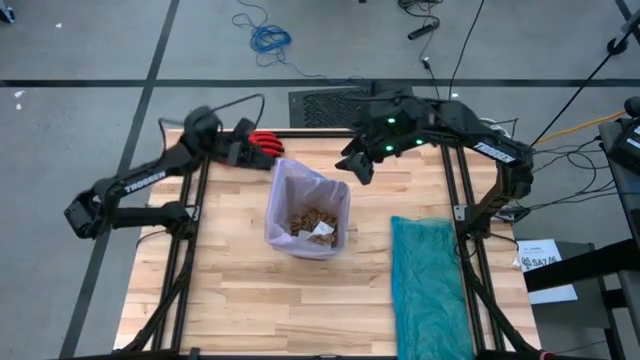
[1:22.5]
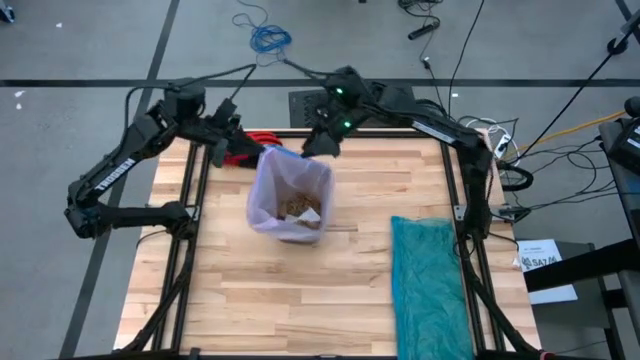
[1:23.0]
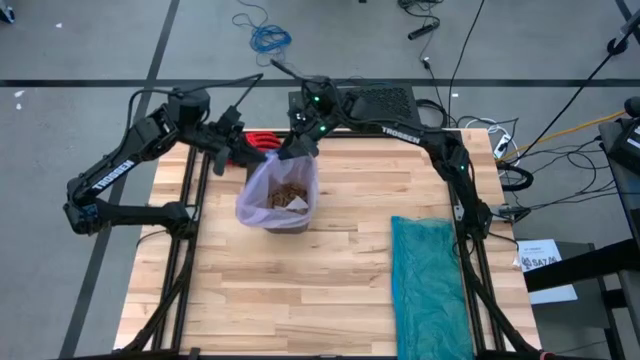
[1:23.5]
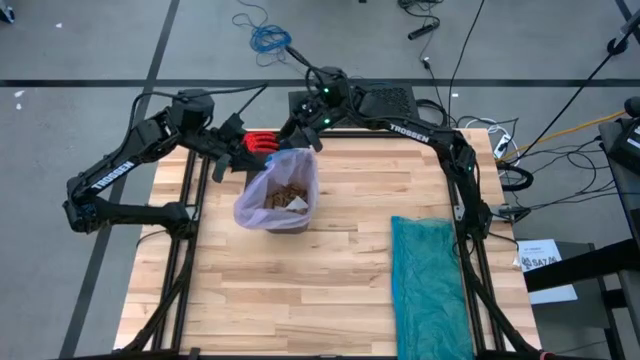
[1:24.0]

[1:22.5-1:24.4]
Task: place trash/remove bag and relplace
Close the pink trash bag inside the trash bin

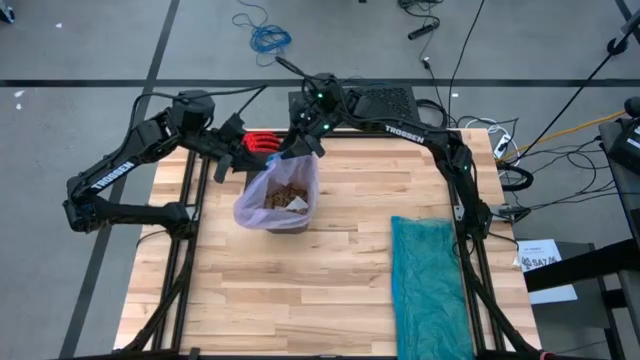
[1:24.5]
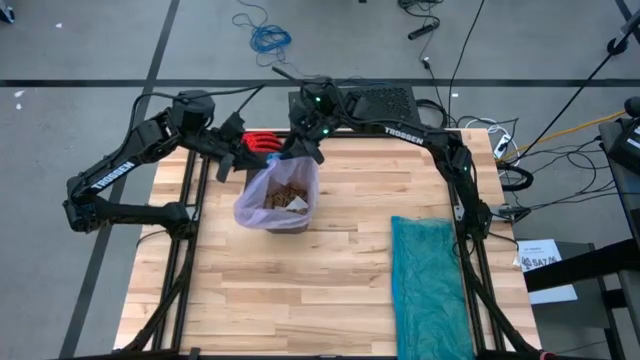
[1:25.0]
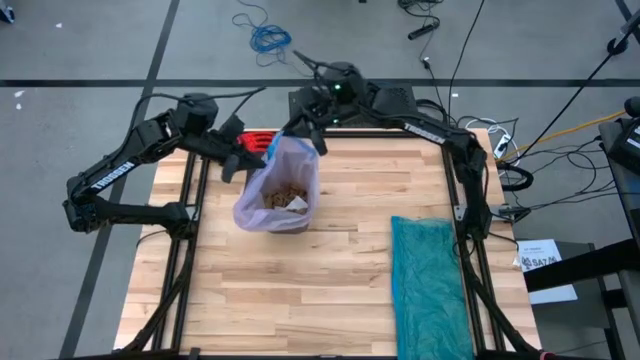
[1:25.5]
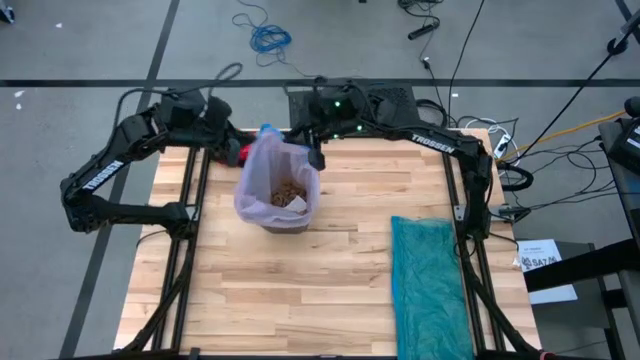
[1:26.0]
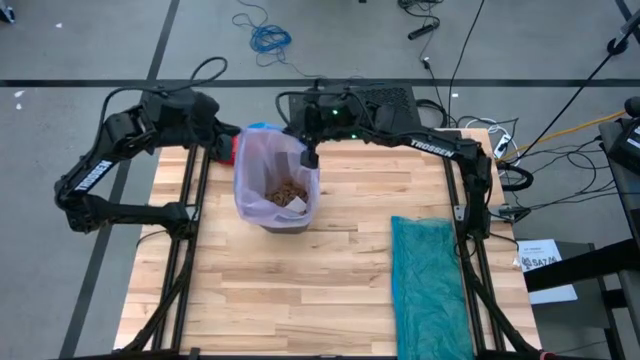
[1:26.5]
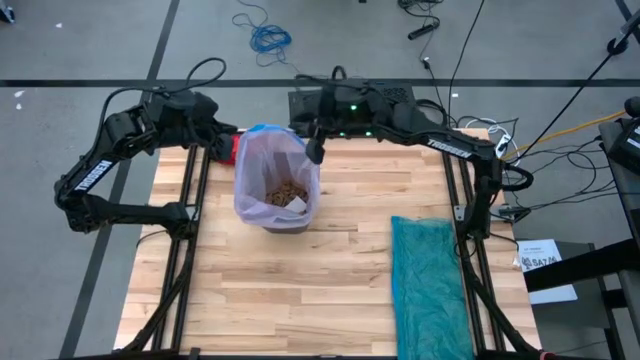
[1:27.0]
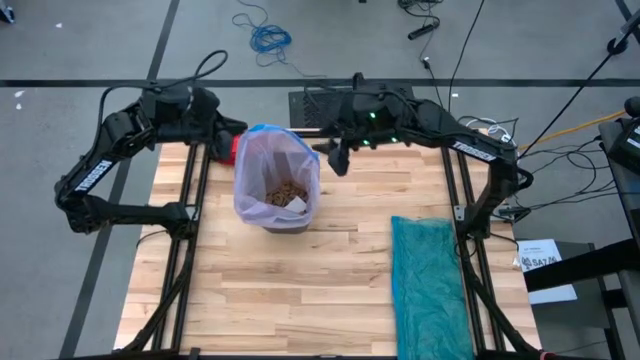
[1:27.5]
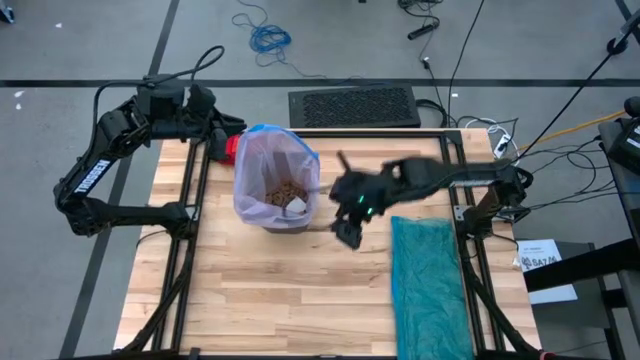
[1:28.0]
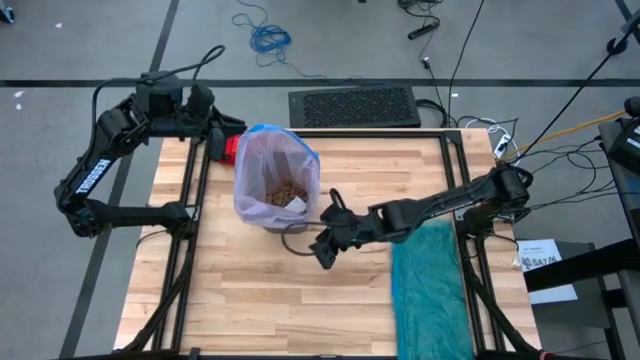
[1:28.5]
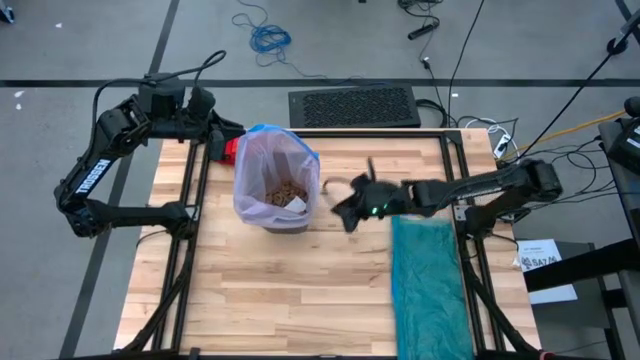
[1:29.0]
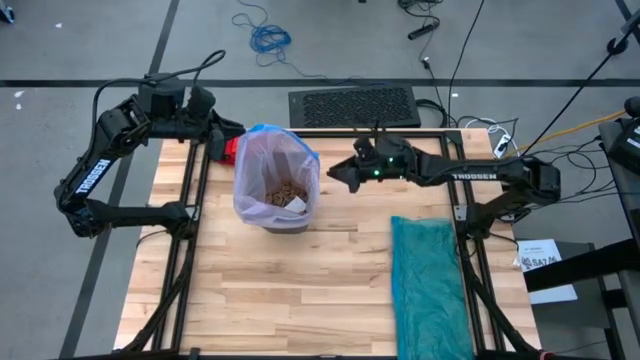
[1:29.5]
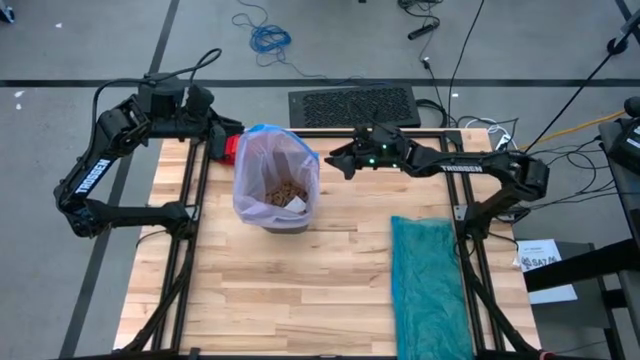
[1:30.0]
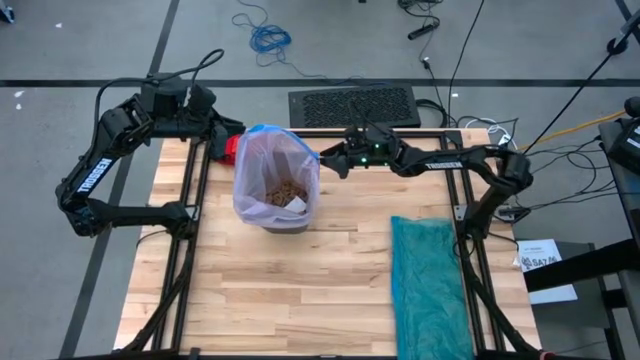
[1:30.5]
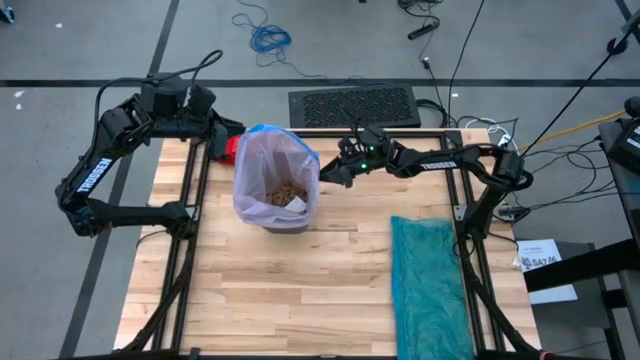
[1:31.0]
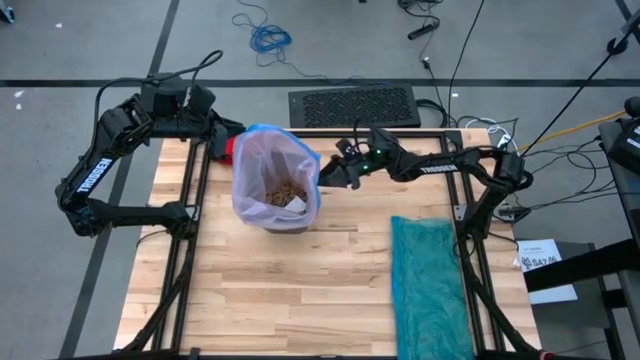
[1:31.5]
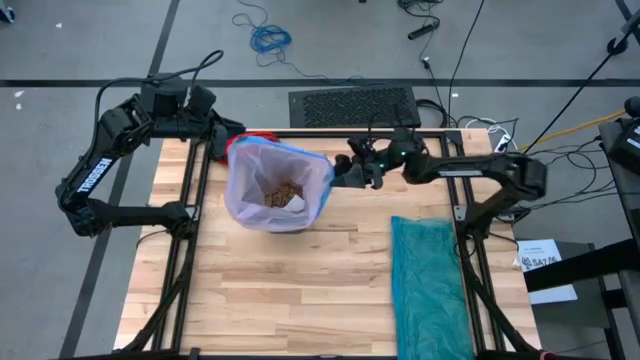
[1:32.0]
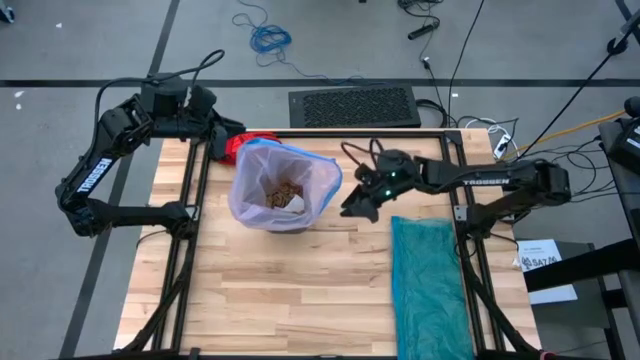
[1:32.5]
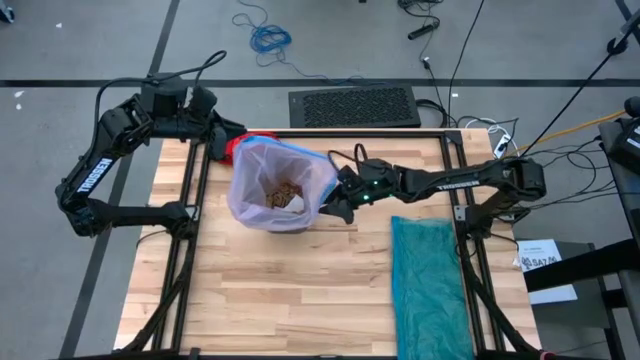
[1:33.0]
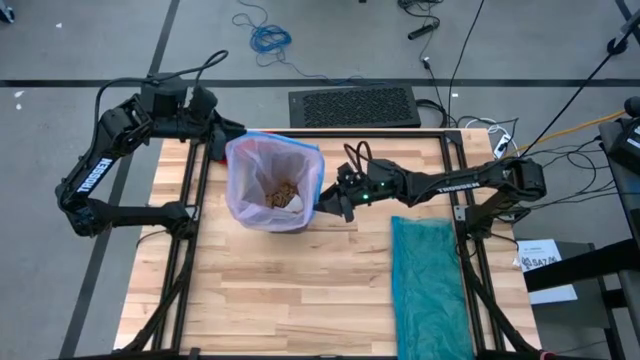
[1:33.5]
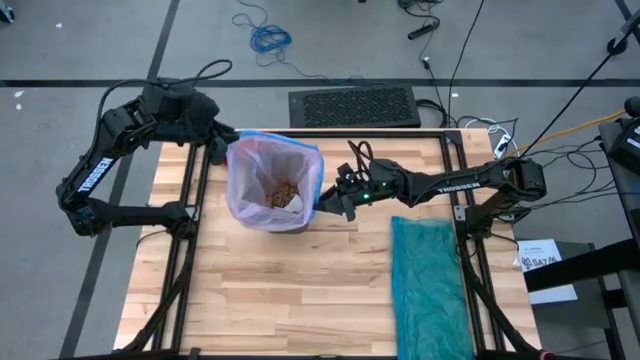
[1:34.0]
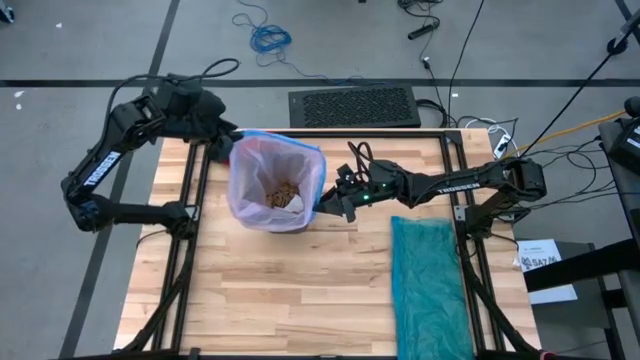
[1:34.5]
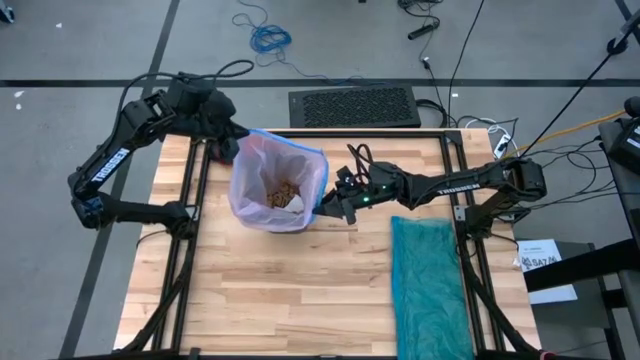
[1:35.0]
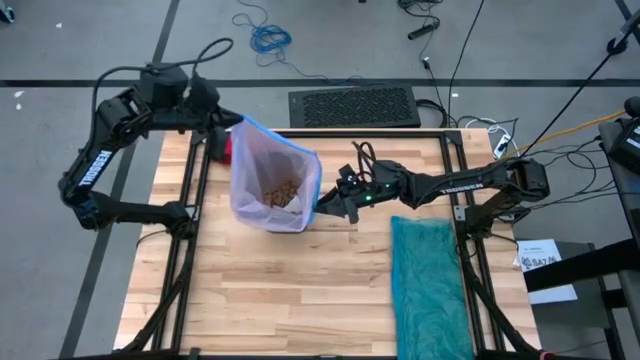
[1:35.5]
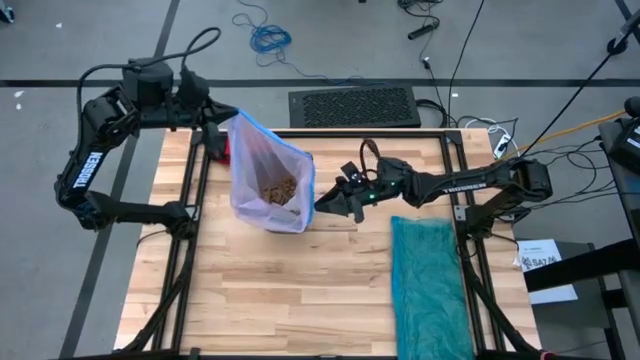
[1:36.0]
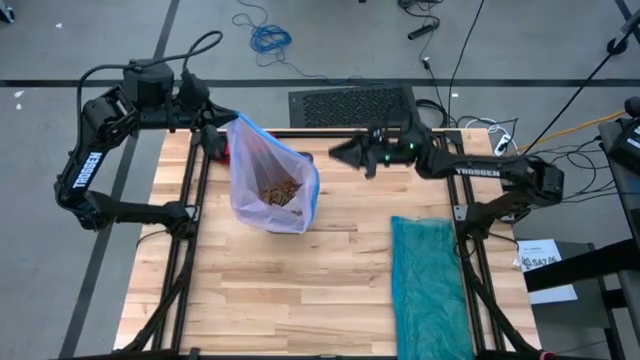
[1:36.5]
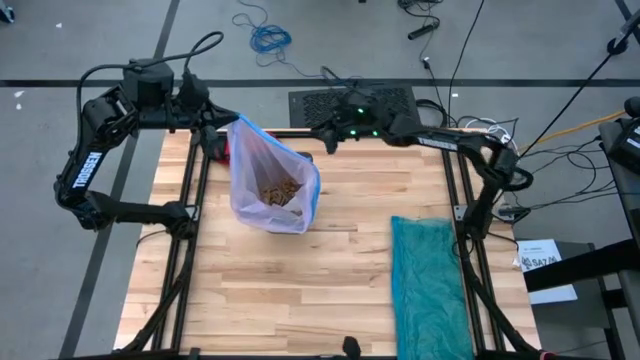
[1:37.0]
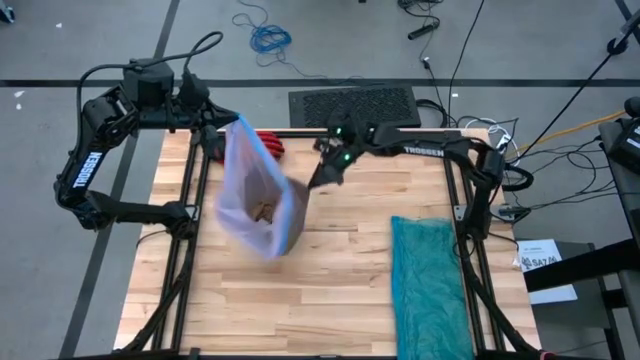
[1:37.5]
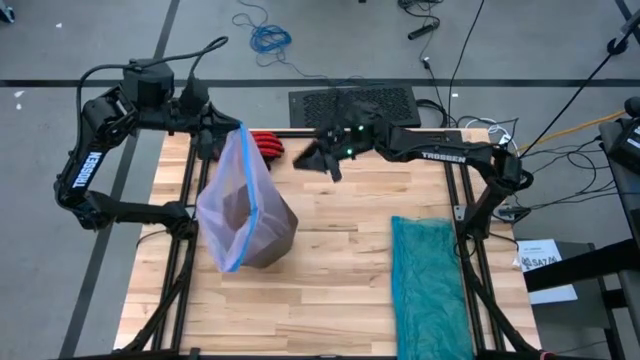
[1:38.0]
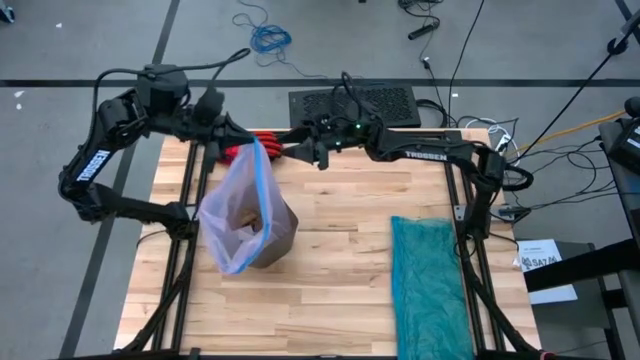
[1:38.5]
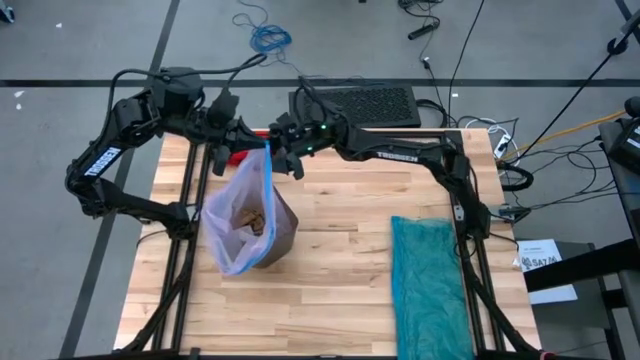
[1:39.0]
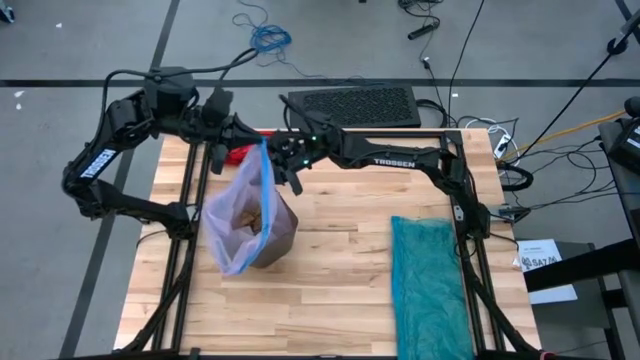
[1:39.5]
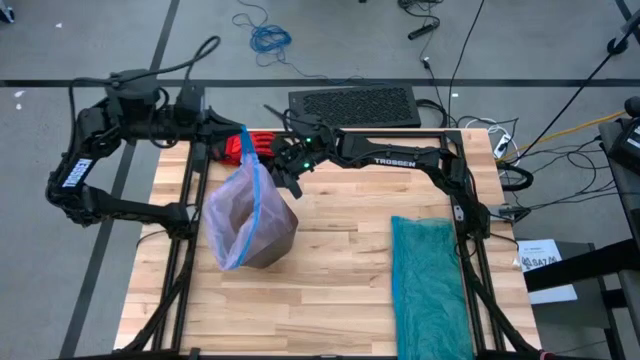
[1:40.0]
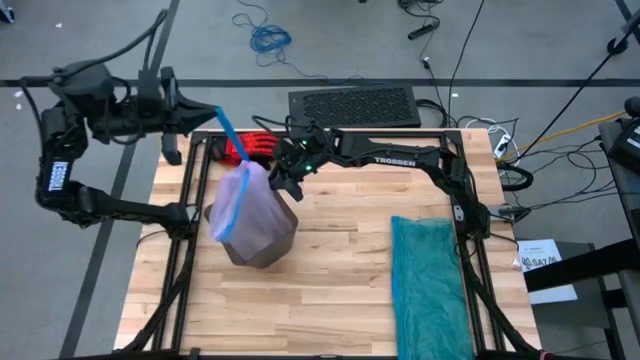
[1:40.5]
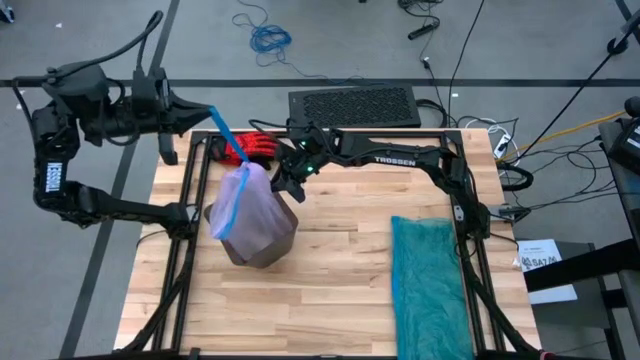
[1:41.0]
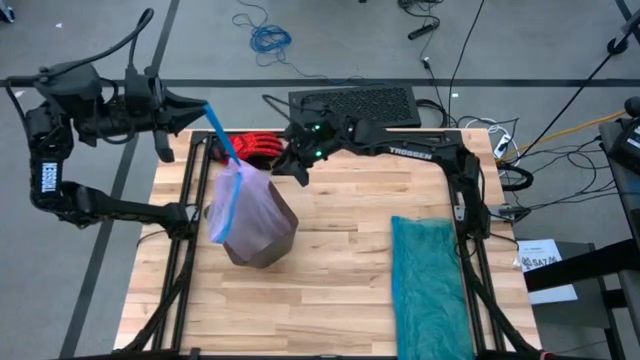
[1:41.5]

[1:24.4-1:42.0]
Close the pink trash bag inside the trash bin

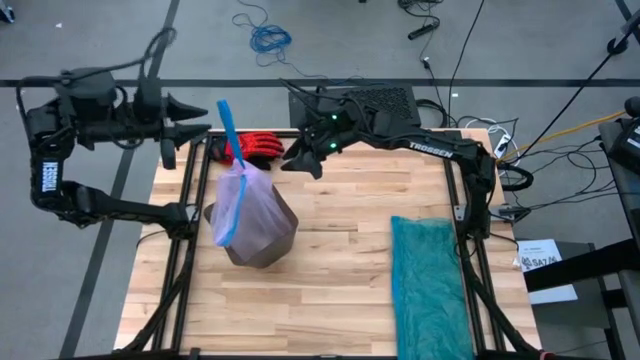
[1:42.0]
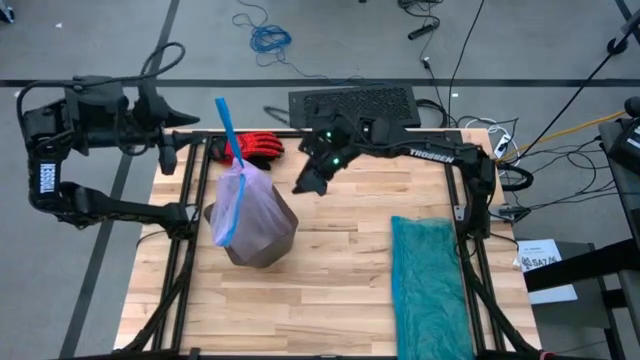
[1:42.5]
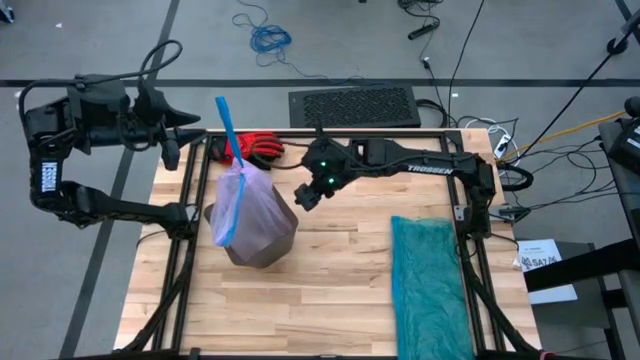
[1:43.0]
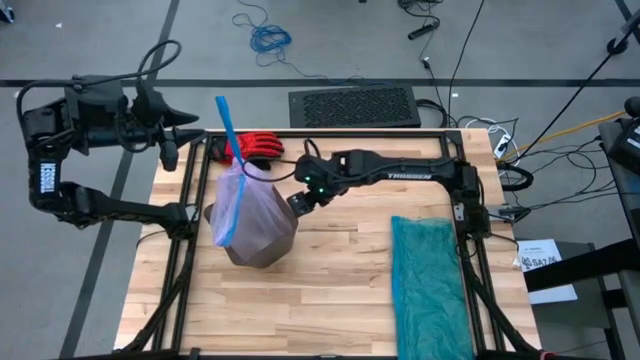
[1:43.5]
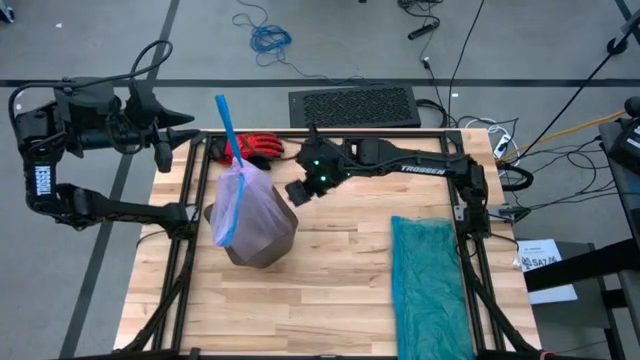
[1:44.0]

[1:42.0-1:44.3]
Move the trash bin to the center of the table

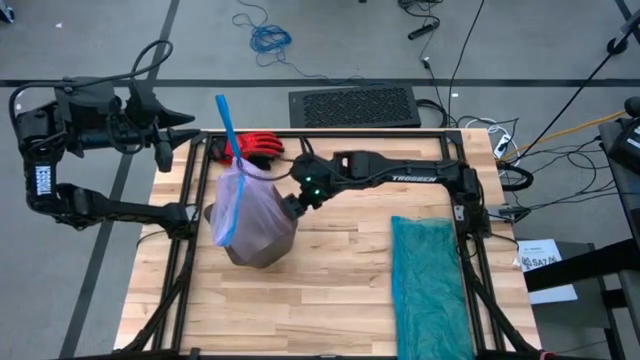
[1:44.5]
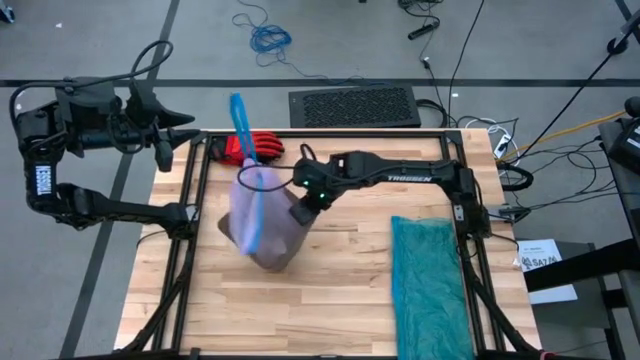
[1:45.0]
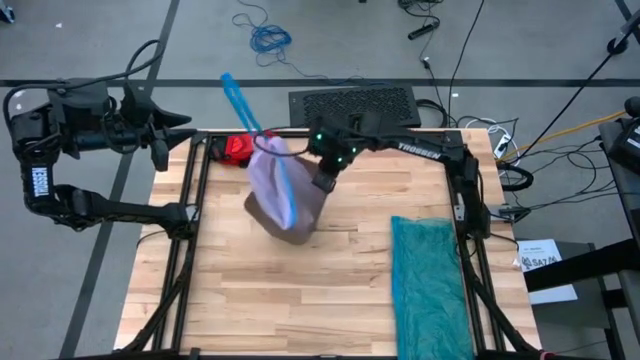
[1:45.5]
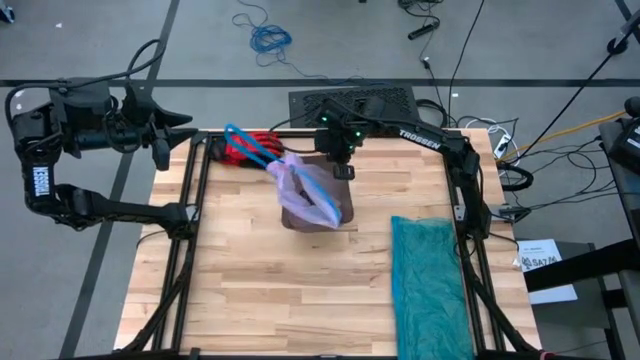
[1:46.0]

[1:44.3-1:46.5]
Move the trash bin to the center of the table
